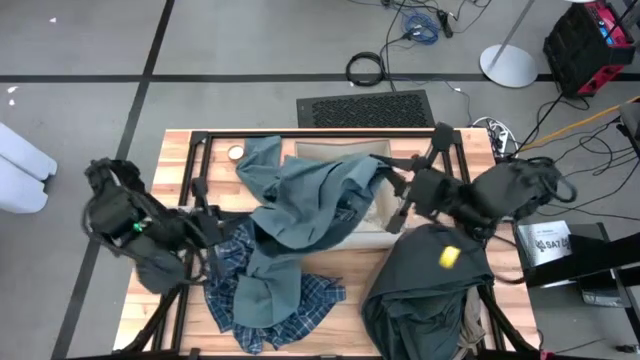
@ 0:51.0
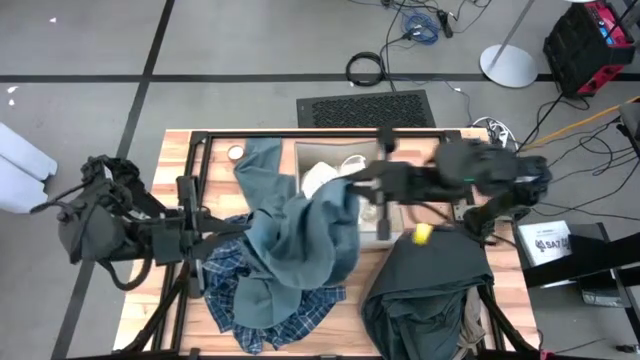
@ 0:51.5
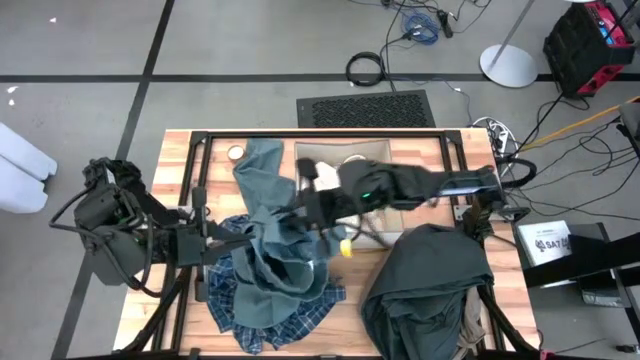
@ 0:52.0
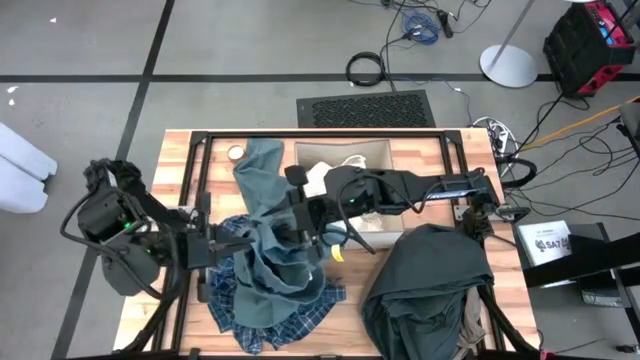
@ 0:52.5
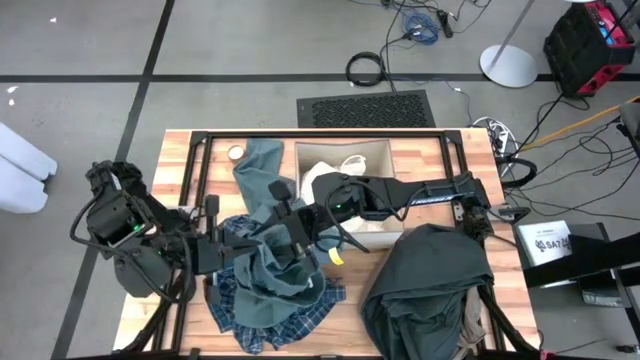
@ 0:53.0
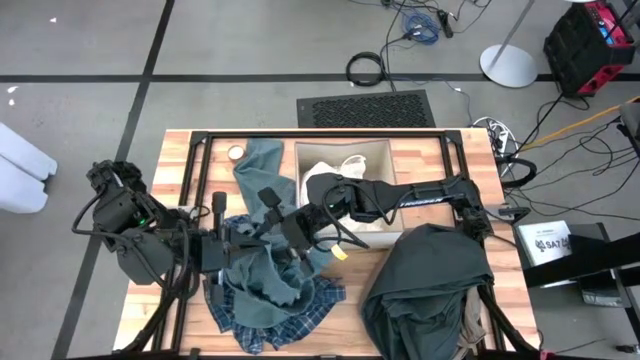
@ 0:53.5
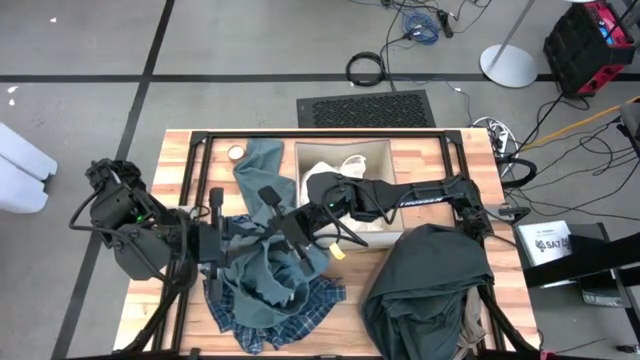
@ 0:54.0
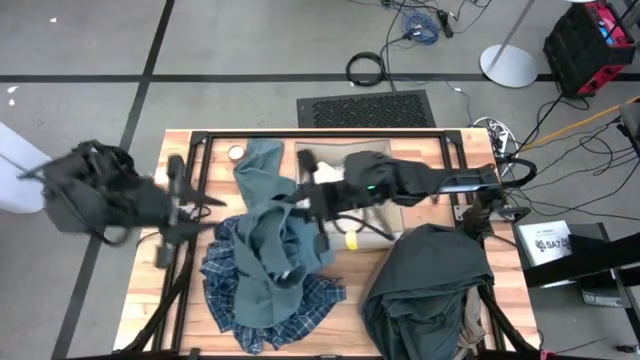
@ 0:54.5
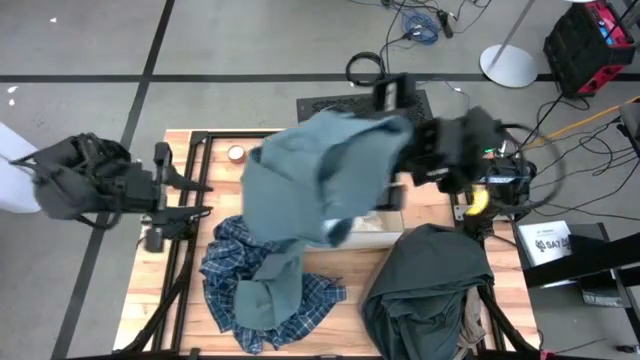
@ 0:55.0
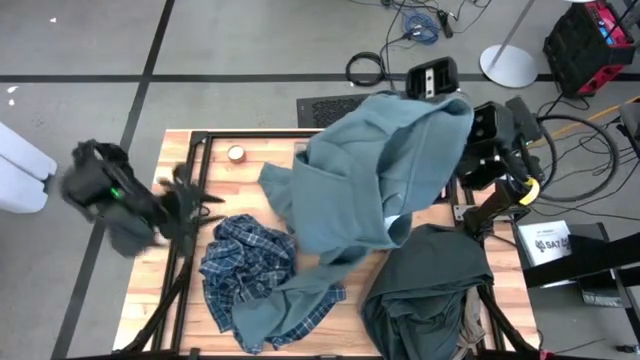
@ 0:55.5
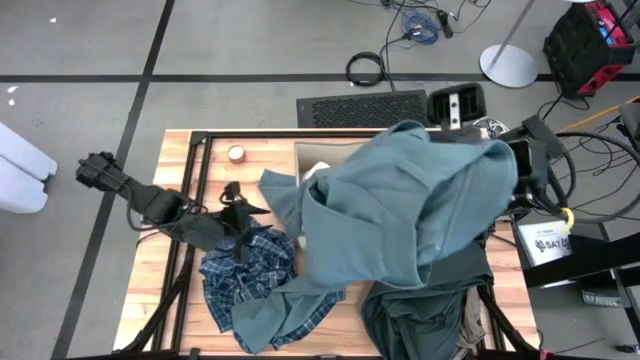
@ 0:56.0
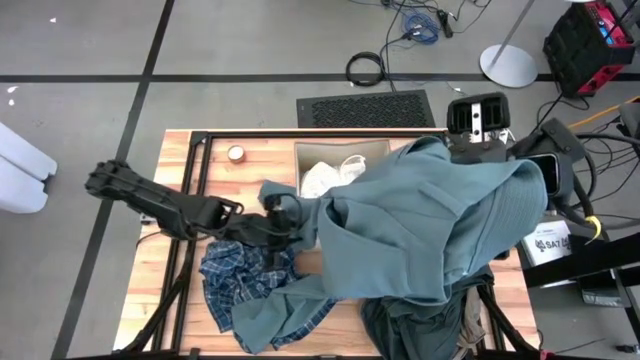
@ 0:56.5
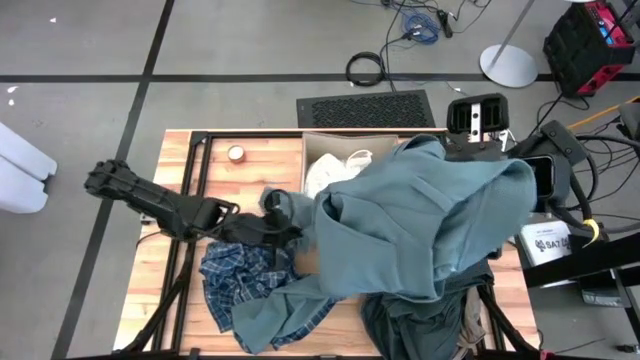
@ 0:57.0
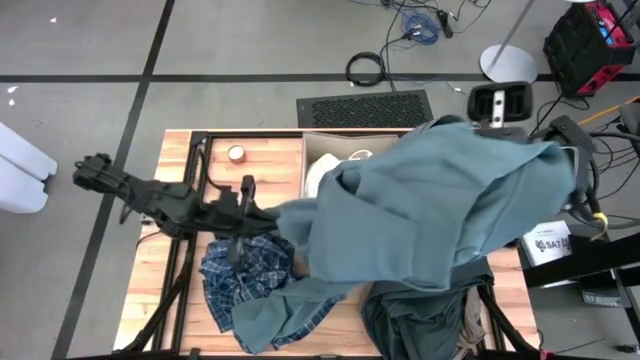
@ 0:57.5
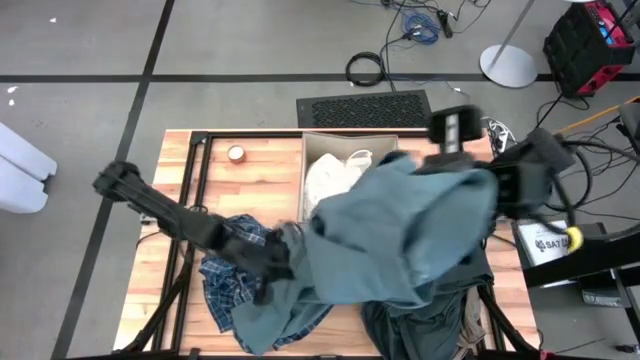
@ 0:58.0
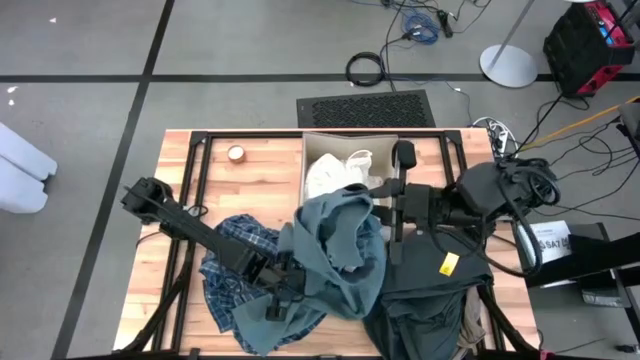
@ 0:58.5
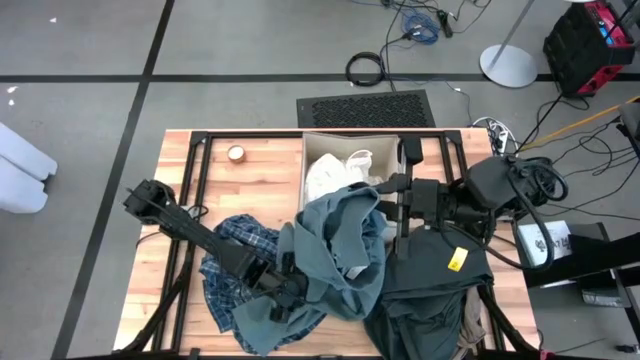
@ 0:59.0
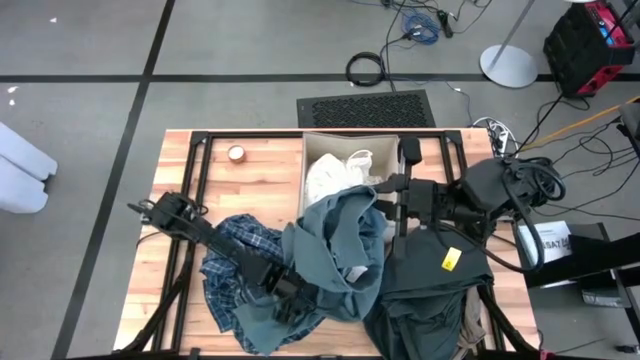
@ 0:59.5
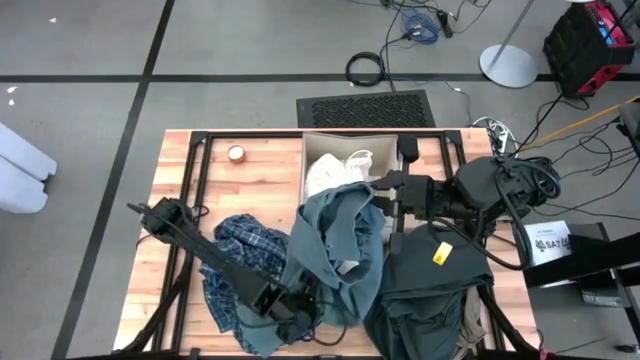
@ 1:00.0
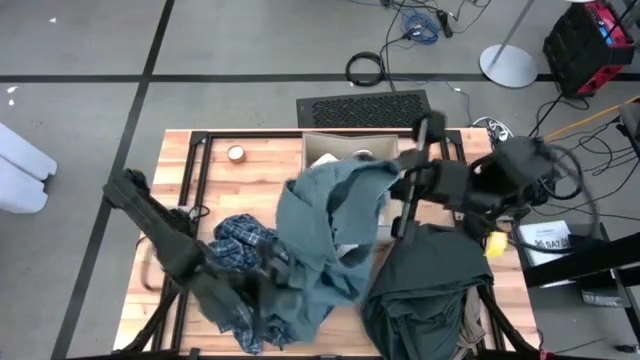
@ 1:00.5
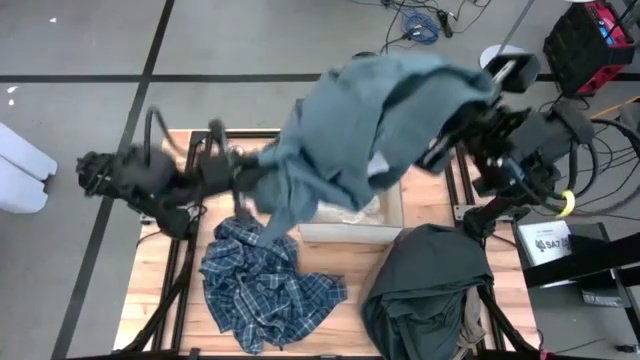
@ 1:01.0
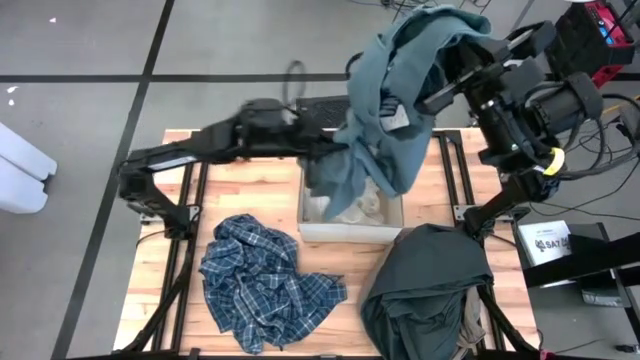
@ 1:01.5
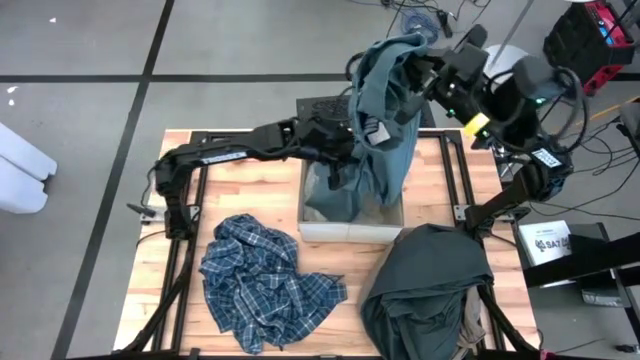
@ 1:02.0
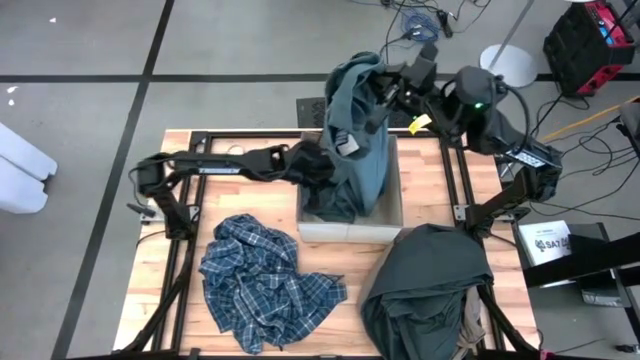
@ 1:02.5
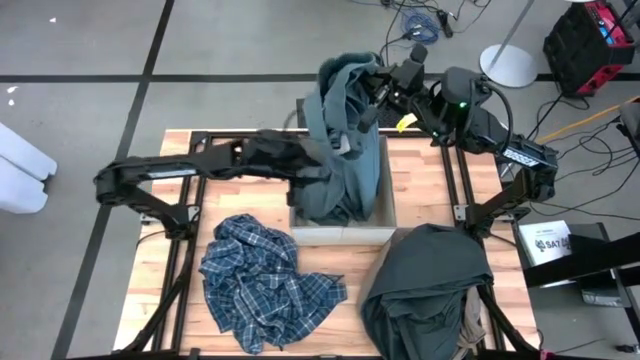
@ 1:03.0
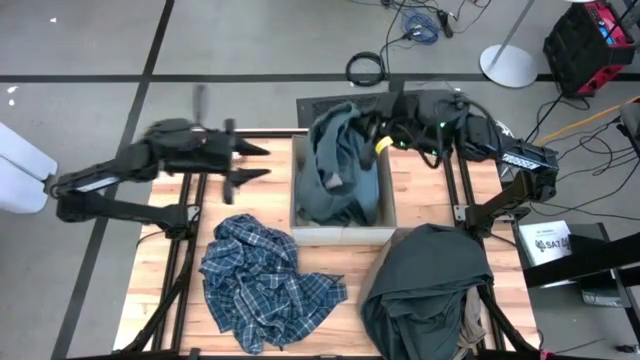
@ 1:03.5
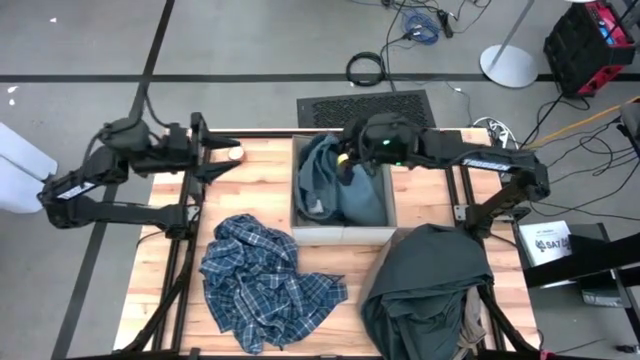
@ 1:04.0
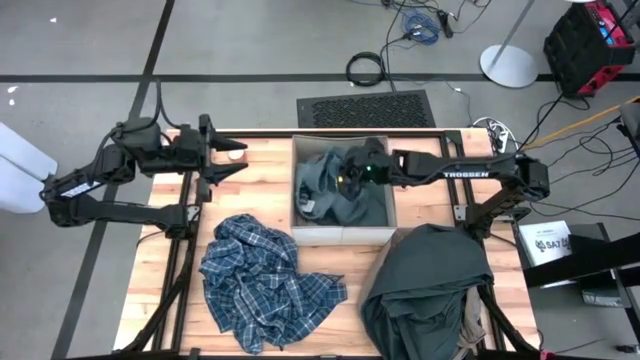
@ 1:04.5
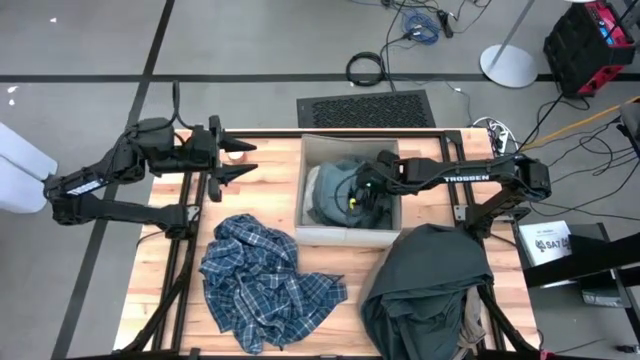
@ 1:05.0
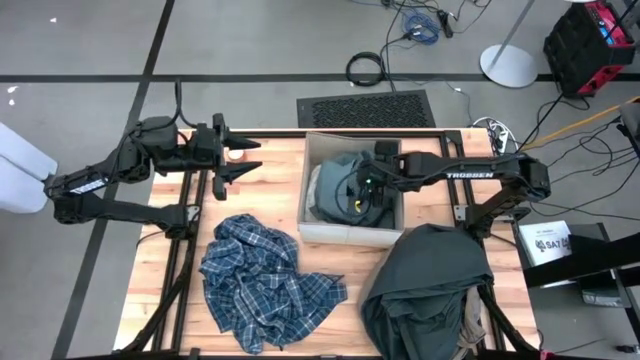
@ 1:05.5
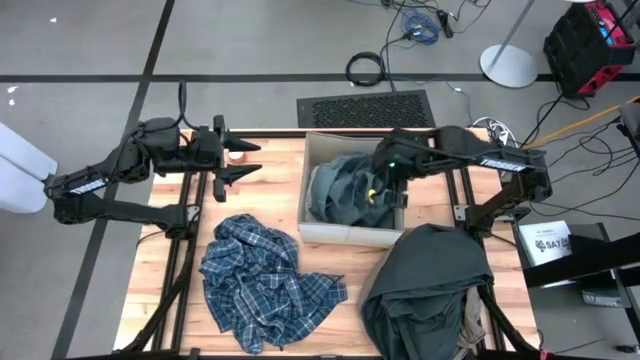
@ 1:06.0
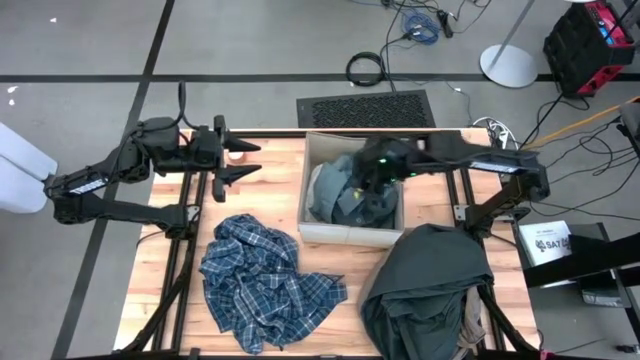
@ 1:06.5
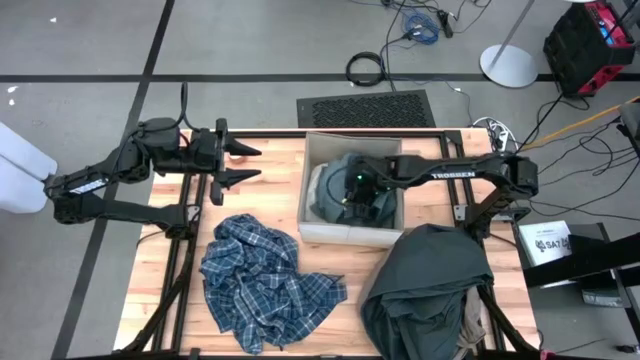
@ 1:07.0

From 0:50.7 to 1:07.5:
Task: Sort clothes
Put the green pants into the laundry organizer
